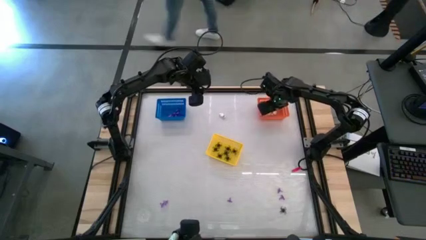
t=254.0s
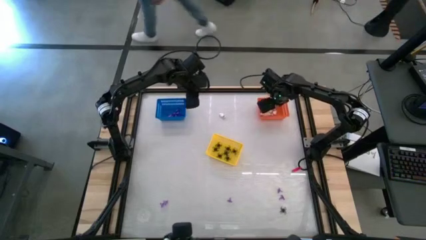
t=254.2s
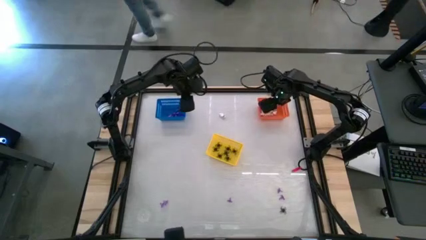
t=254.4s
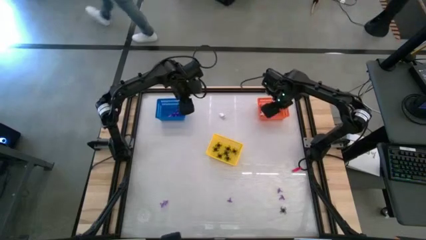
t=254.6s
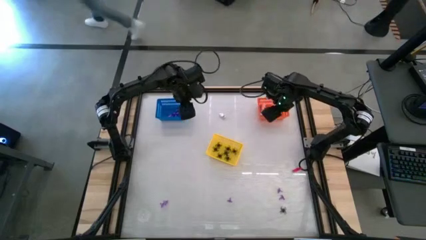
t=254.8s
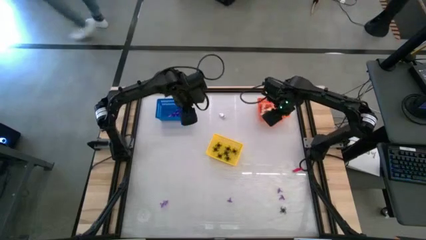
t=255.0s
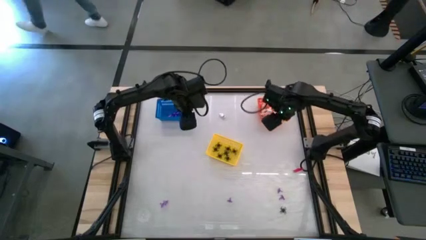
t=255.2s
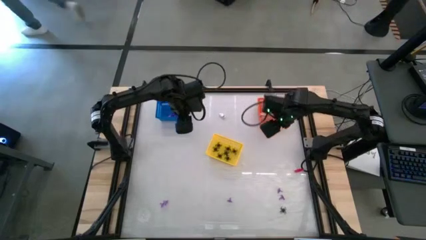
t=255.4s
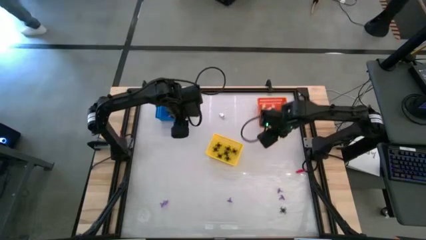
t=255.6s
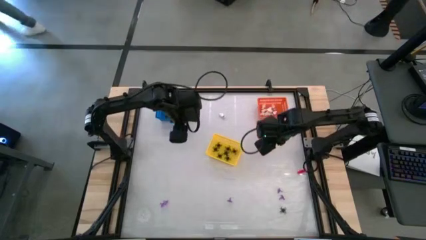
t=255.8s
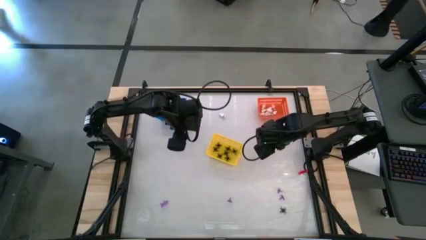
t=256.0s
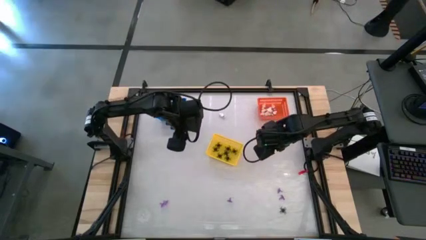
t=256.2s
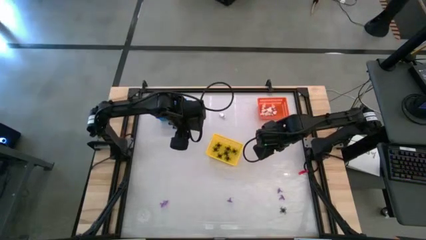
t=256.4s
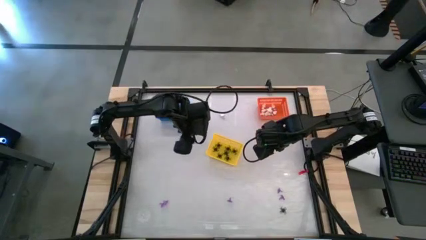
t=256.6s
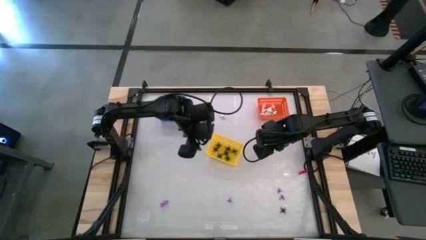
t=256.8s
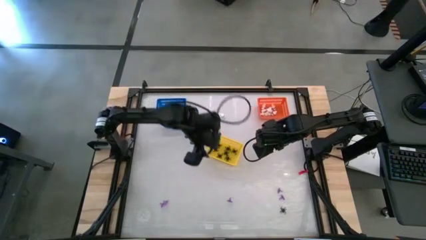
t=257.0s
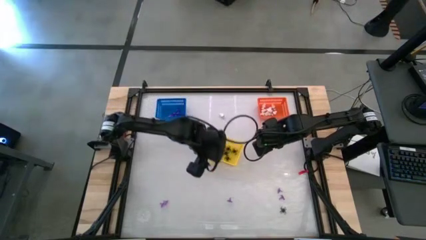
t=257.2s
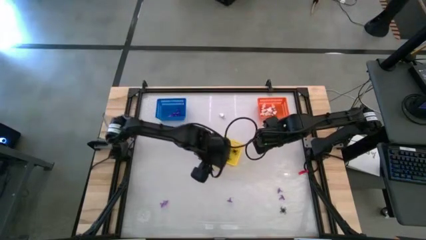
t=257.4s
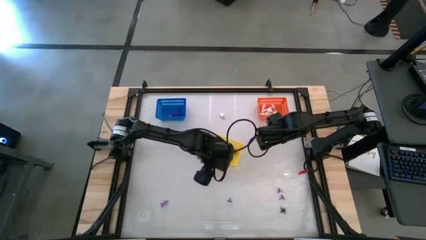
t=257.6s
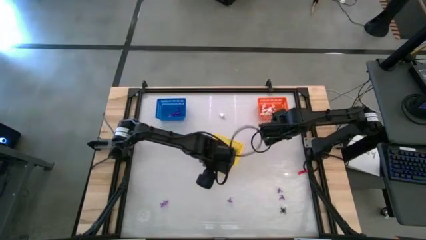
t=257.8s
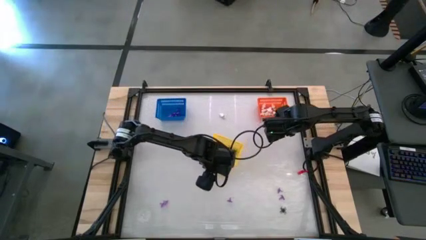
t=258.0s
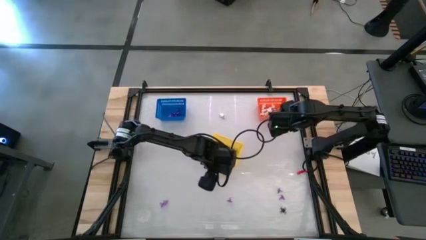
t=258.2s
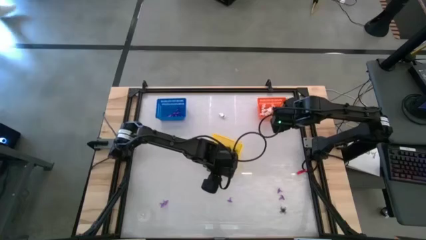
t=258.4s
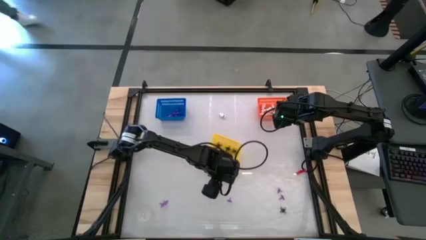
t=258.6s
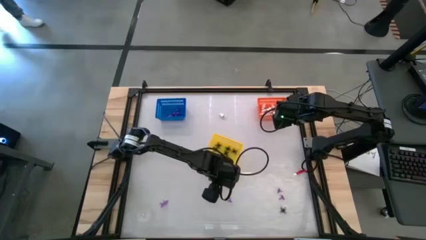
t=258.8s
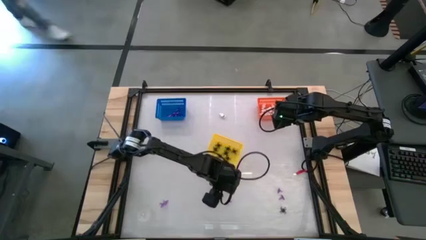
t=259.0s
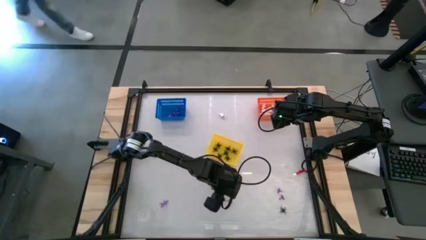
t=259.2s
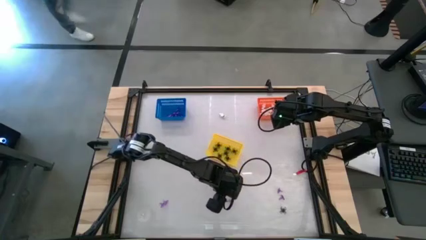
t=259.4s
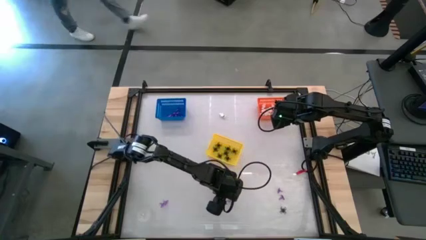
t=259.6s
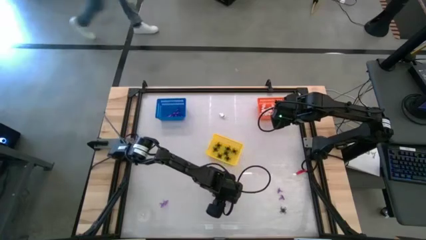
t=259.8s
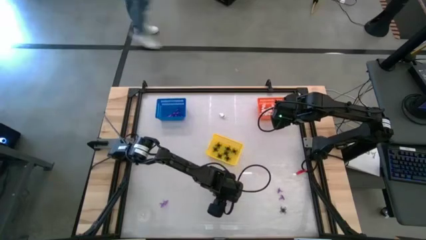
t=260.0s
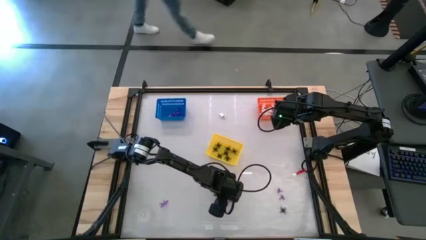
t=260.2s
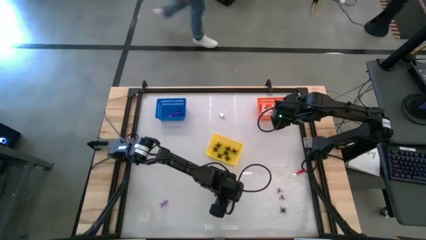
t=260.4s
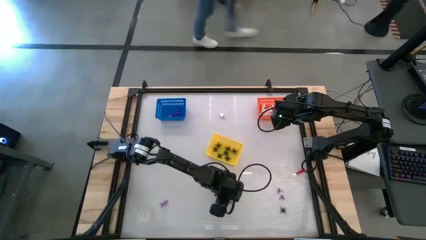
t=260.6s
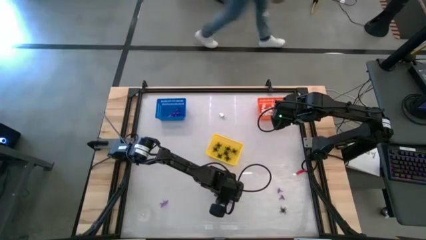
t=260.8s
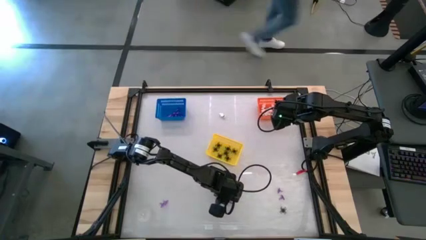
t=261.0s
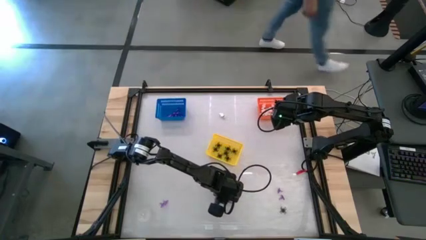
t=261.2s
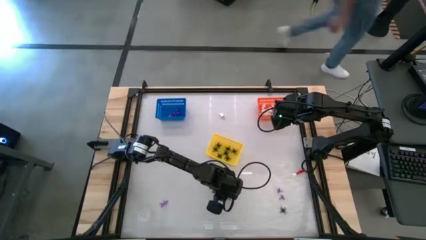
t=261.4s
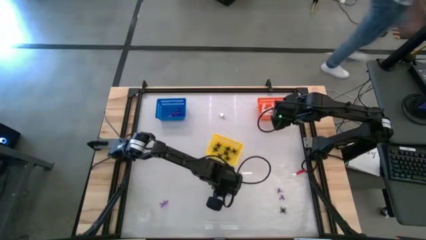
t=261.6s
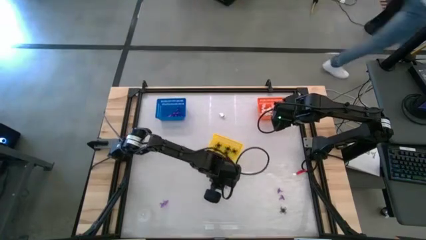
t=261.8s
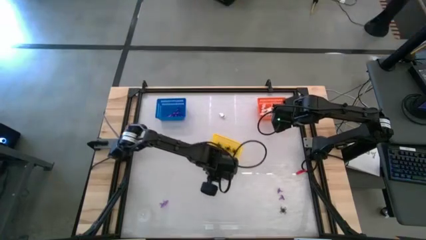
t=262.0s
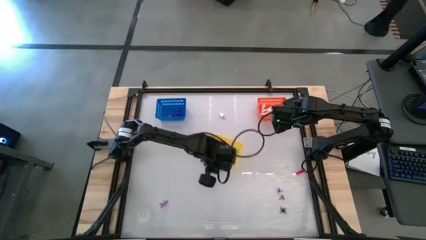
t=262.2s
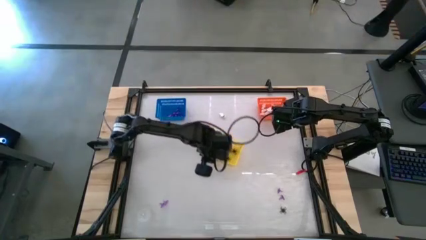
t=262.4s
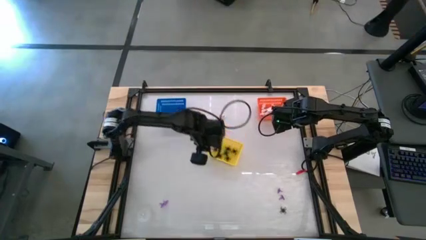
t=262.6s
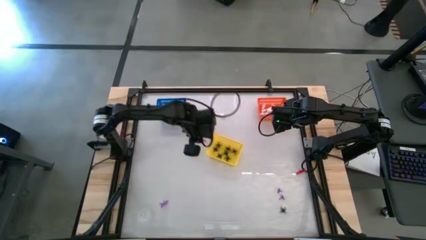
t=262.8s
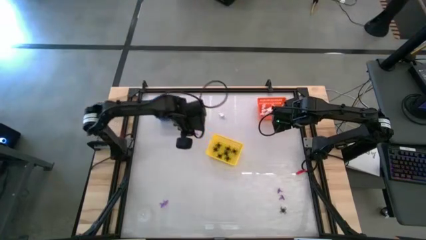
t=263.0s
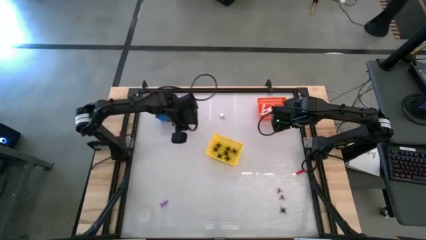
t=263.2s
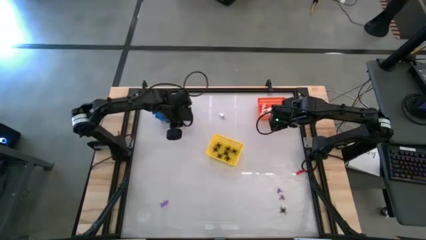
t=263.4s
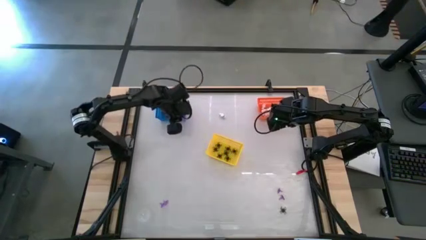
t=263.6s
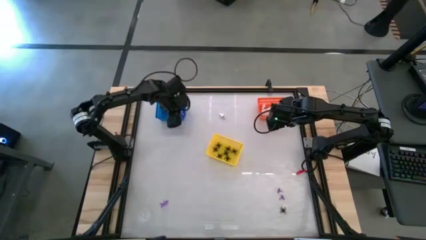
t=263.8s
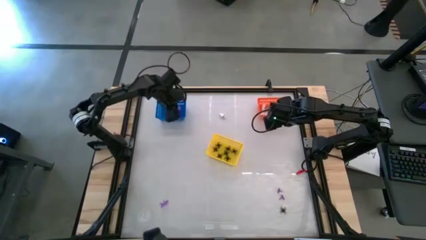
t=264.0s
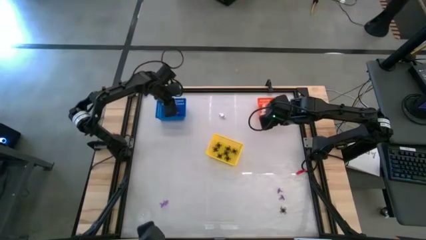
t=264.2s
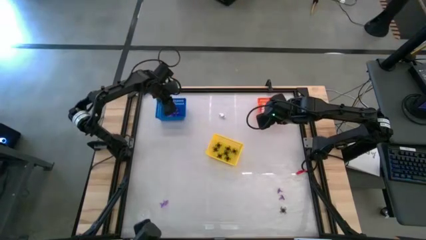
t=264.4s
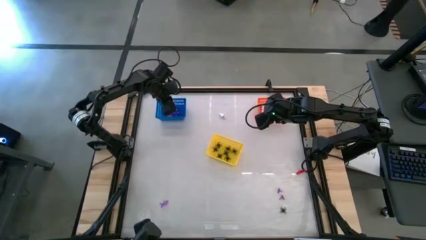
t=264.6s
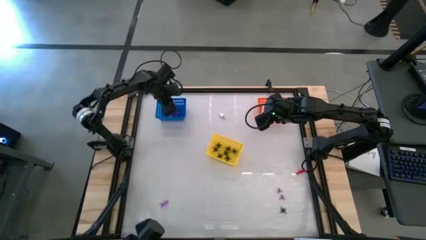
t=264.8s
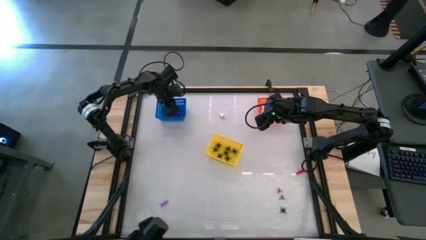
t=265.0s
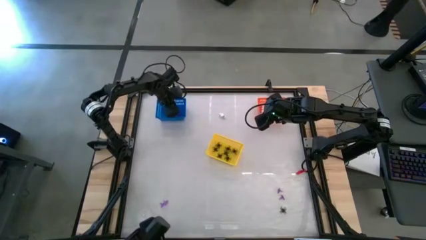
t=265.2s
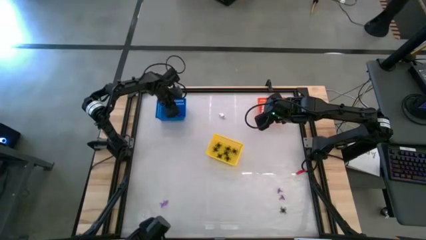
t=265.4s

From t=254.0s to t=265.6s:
Task: Sort Halloween decoration
Put the purple witch hat toy into the blue bin

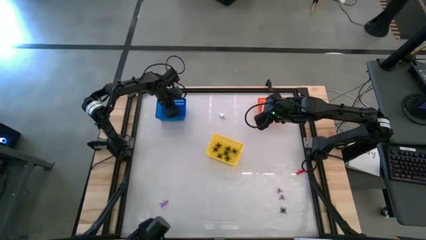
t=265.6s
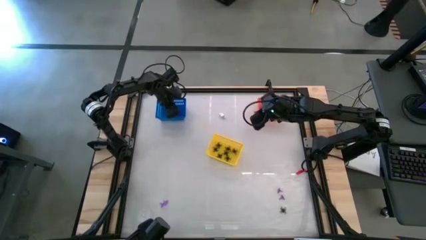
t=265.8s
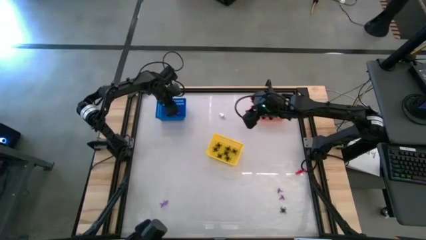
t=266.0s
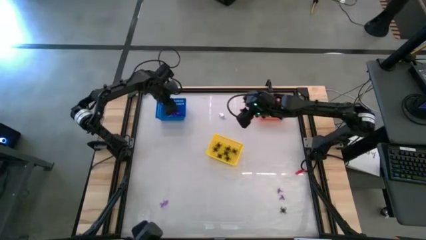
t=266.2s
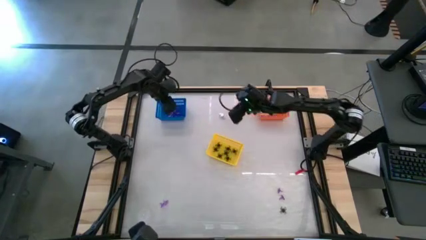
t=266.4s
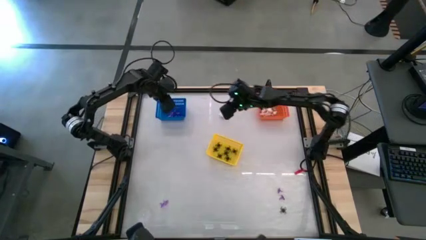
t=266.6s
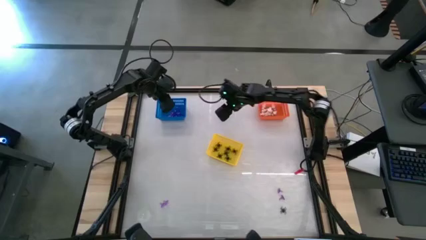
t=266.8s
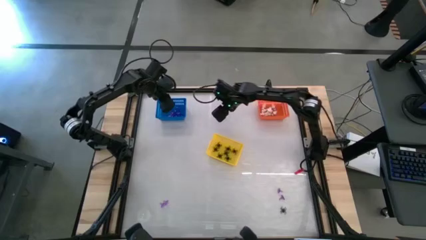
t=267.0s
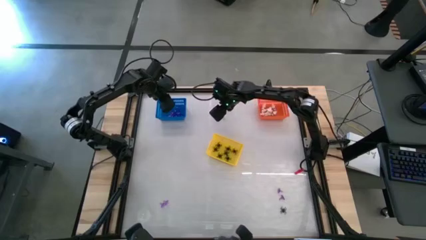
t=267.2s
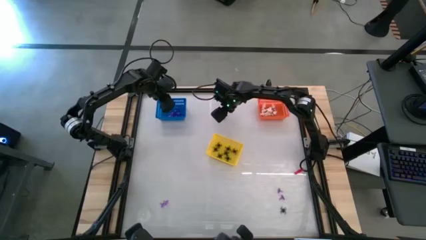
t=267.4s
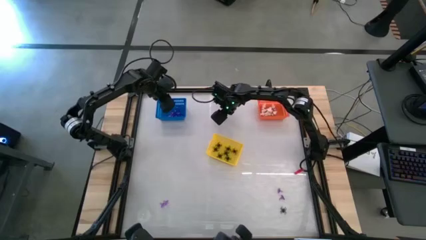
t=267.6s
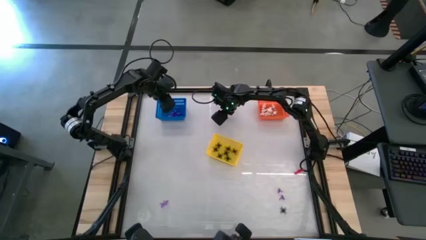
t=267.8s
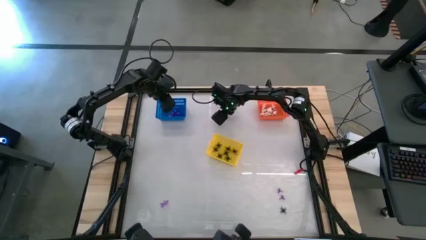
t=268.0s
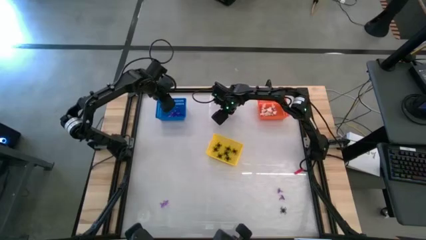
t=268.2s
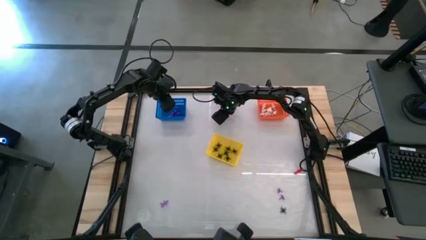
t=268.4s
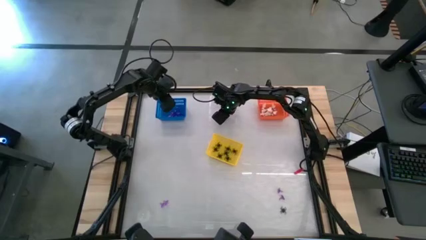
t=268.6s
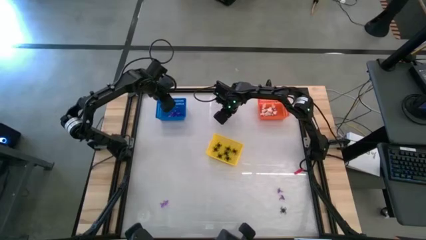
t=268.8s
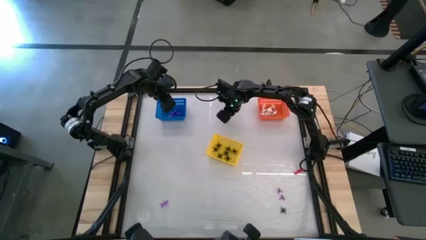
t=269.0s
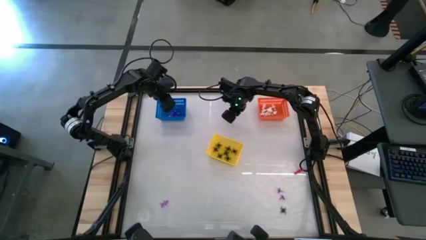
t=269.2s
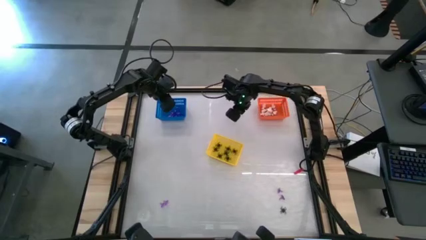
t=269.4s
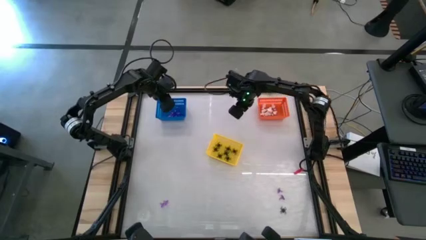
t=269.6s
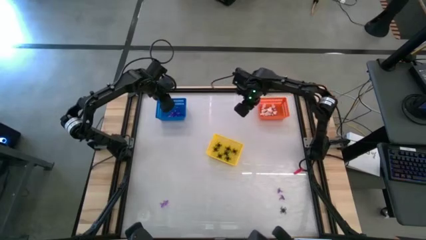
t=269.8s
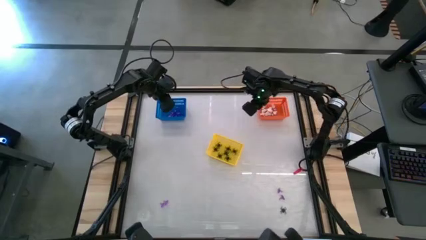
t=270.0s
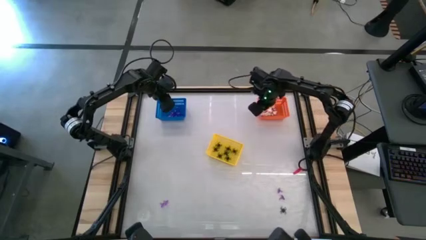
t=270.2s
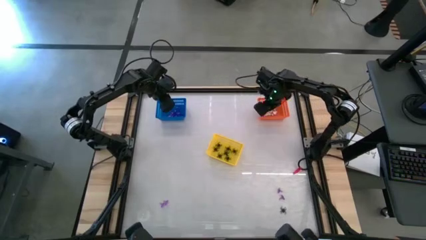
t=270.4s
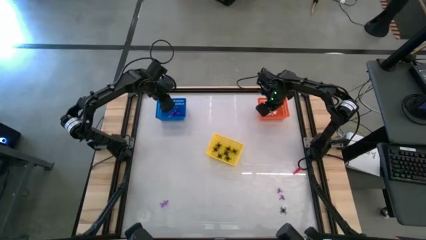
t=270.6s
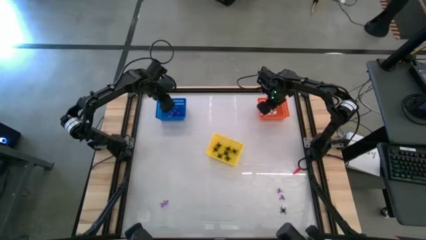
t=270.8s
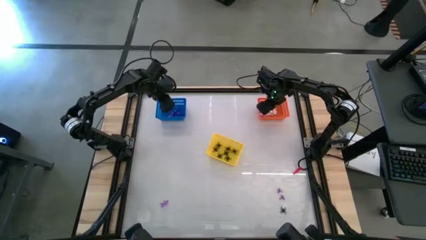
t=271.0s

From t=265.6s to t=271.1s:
Put the white skeleton toy into the orange bin
